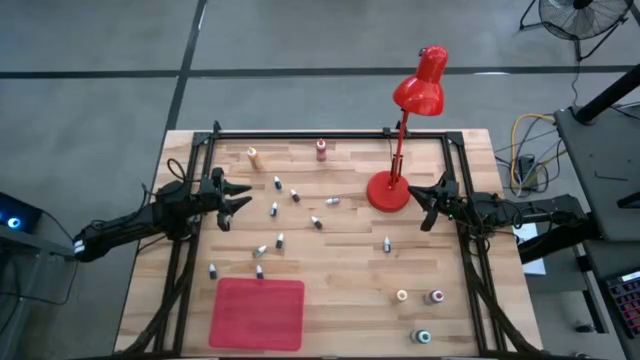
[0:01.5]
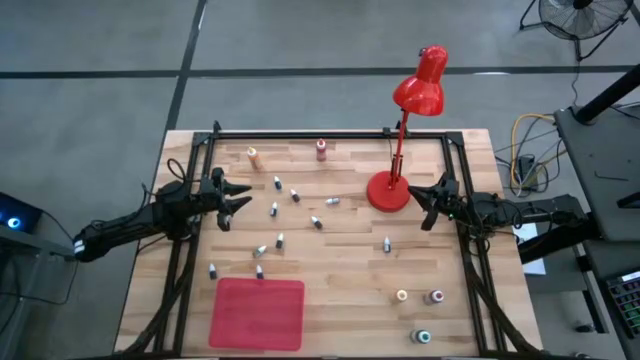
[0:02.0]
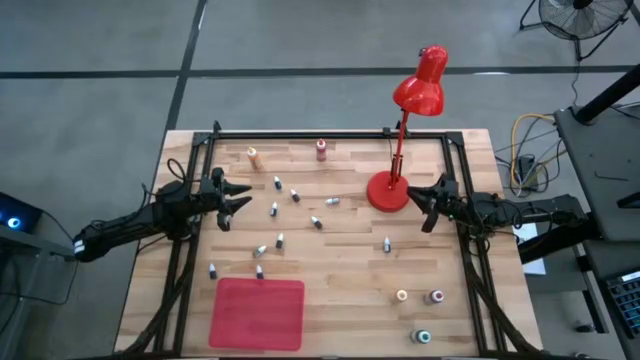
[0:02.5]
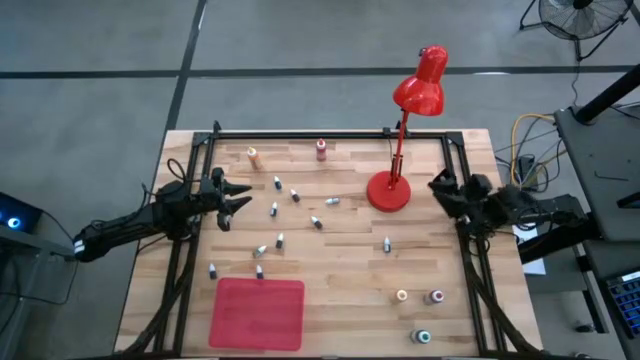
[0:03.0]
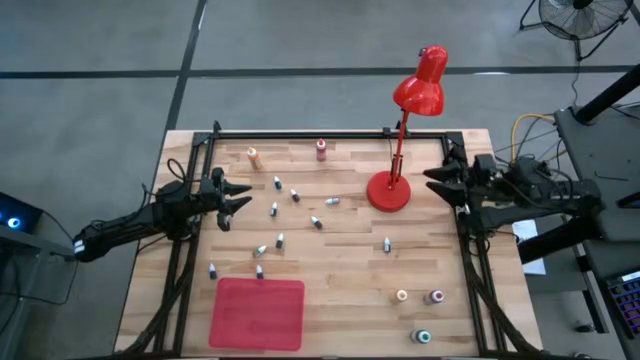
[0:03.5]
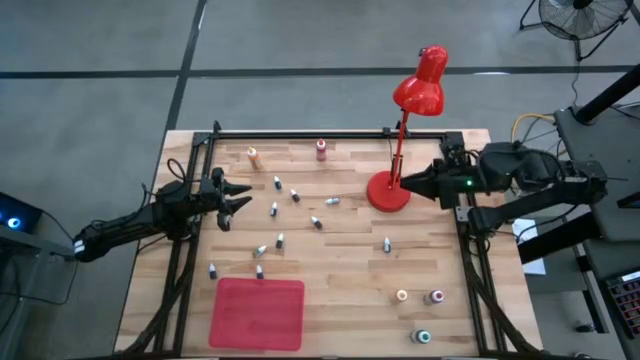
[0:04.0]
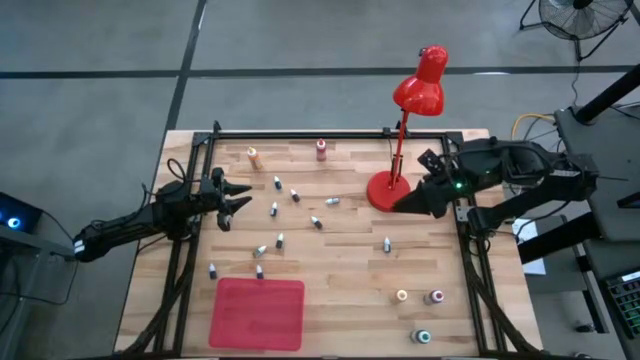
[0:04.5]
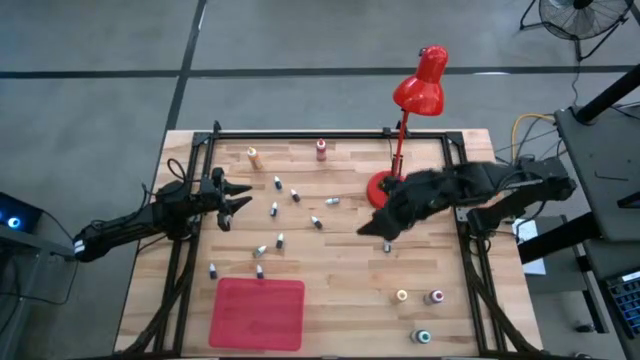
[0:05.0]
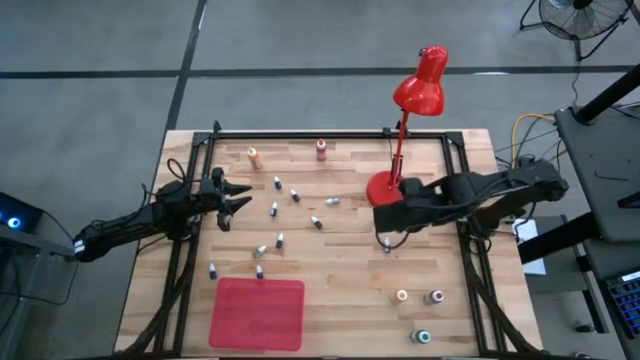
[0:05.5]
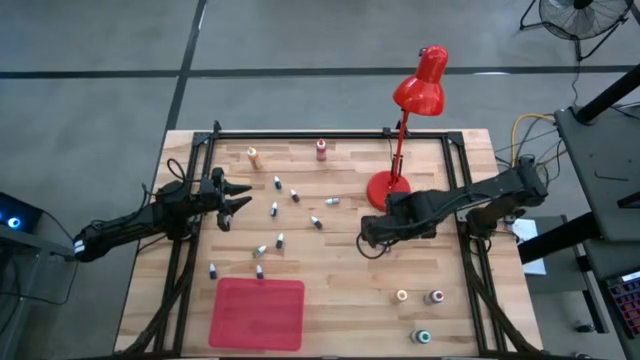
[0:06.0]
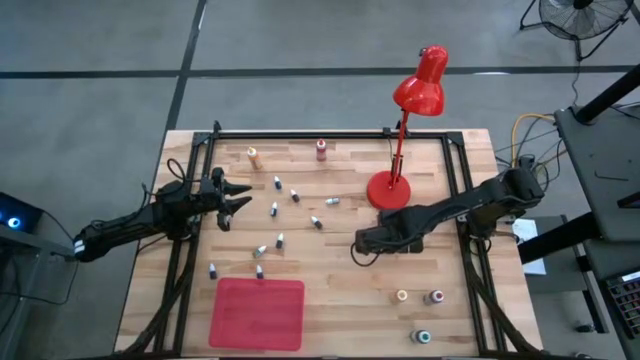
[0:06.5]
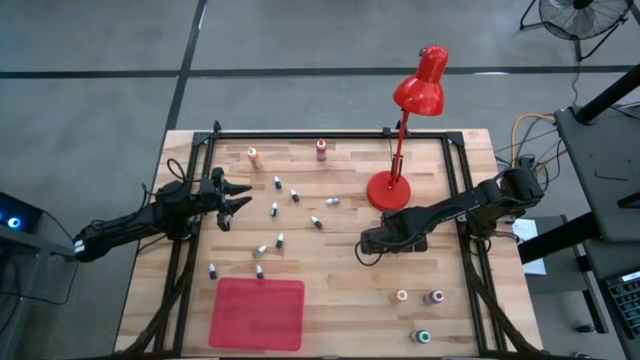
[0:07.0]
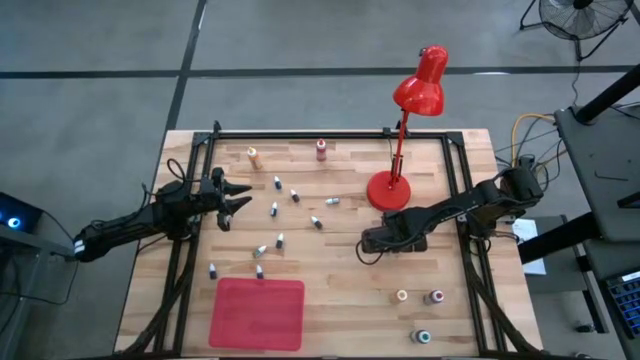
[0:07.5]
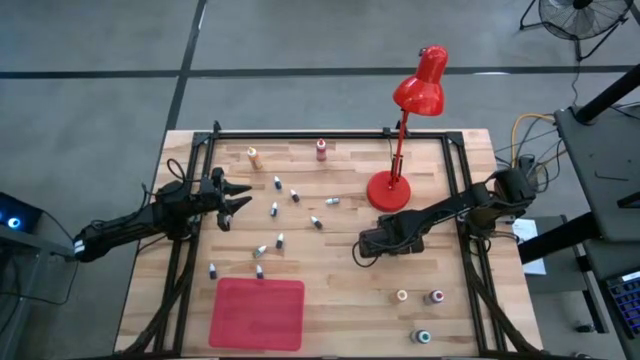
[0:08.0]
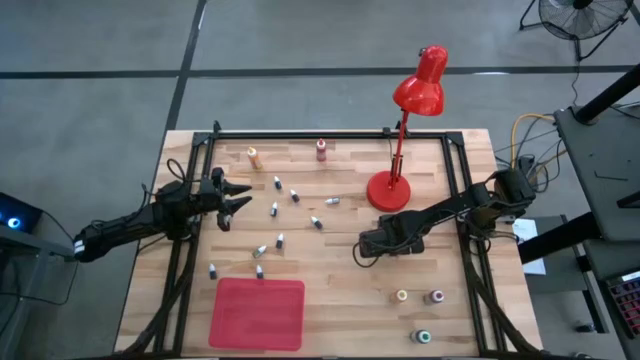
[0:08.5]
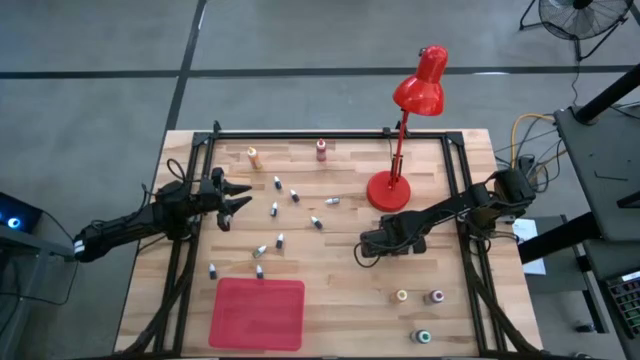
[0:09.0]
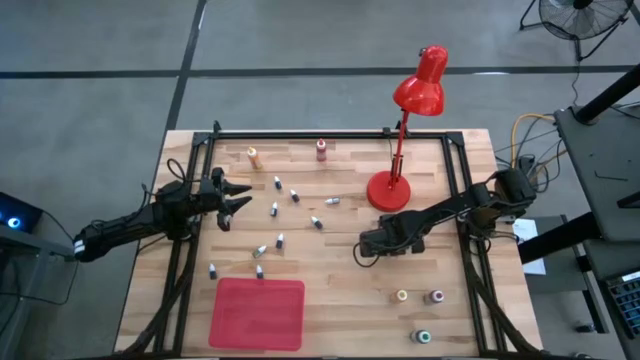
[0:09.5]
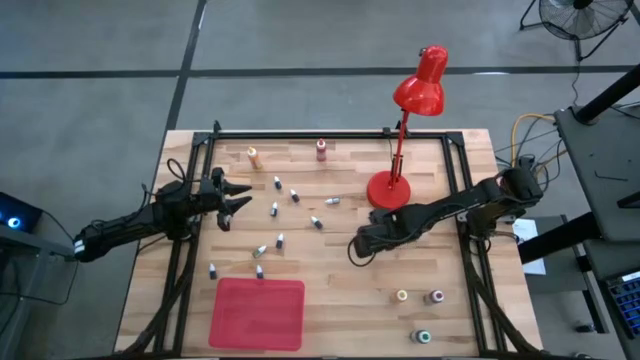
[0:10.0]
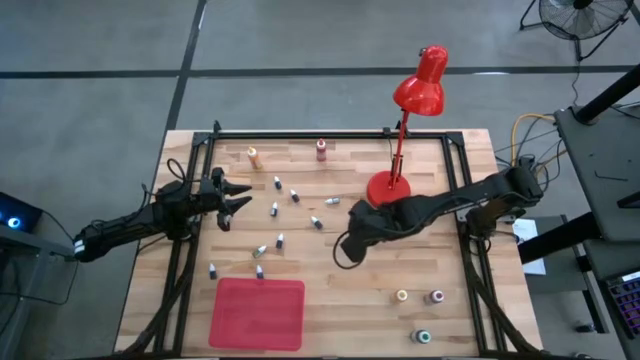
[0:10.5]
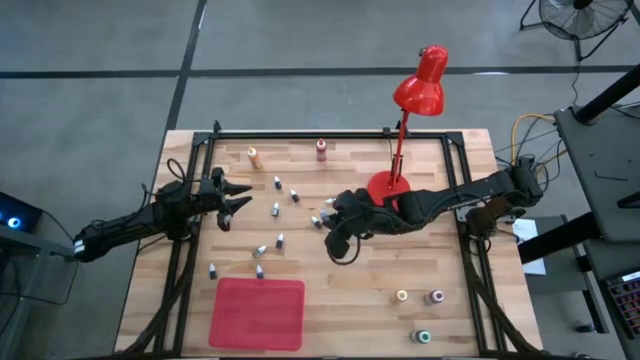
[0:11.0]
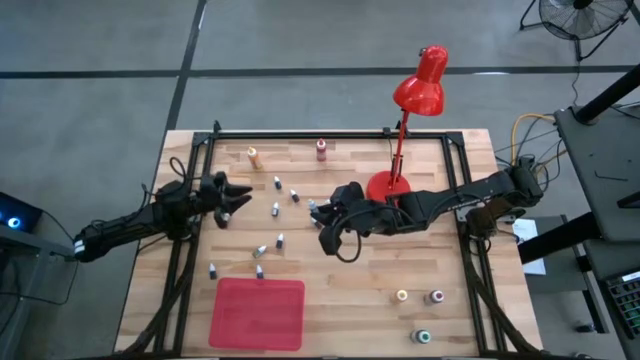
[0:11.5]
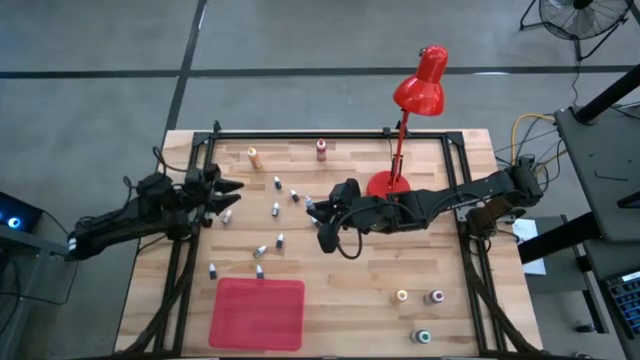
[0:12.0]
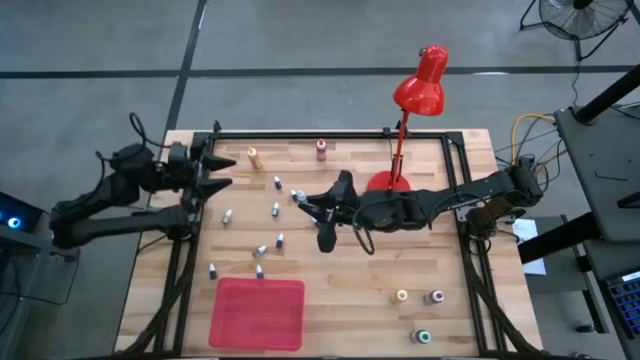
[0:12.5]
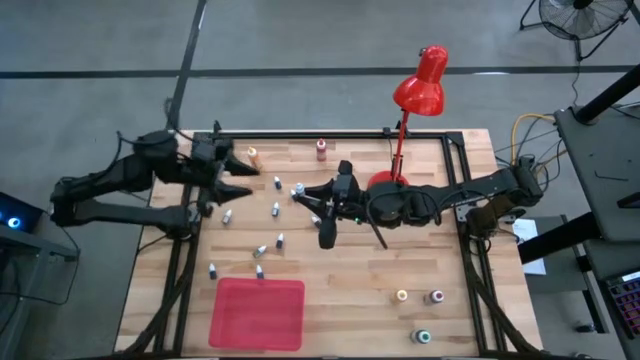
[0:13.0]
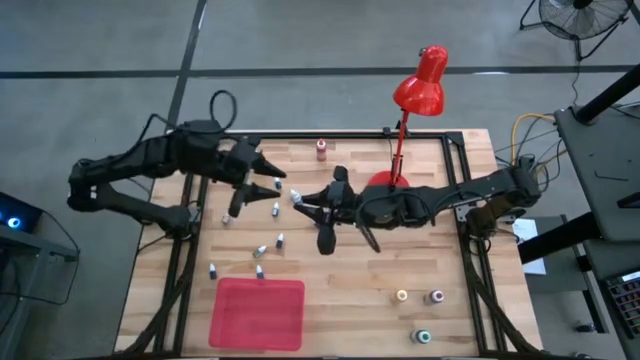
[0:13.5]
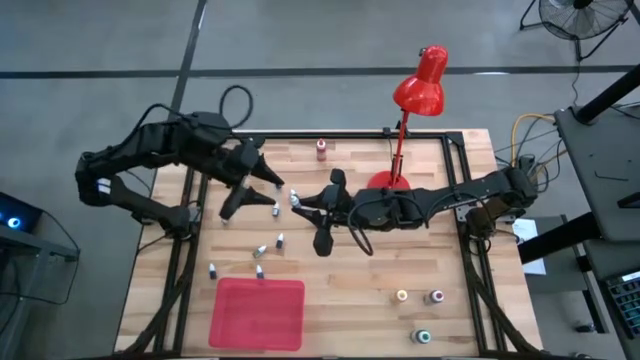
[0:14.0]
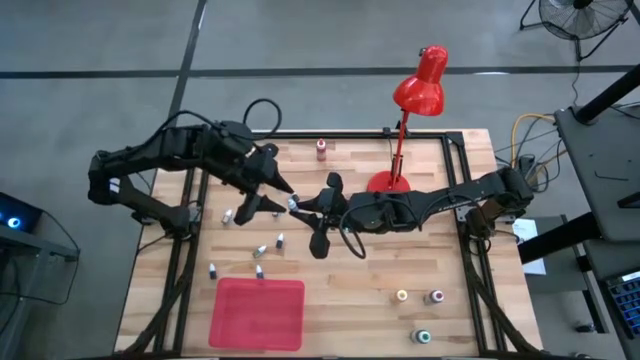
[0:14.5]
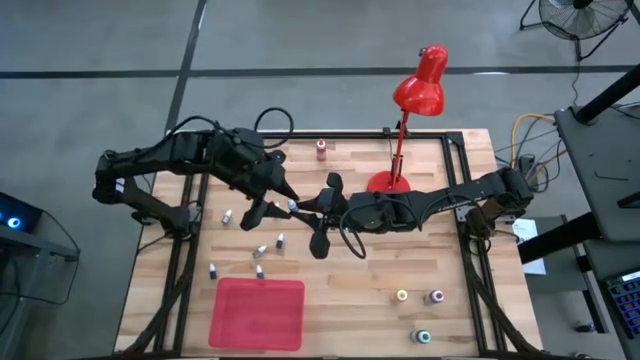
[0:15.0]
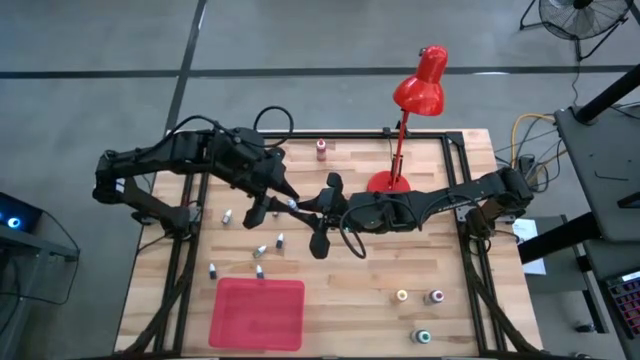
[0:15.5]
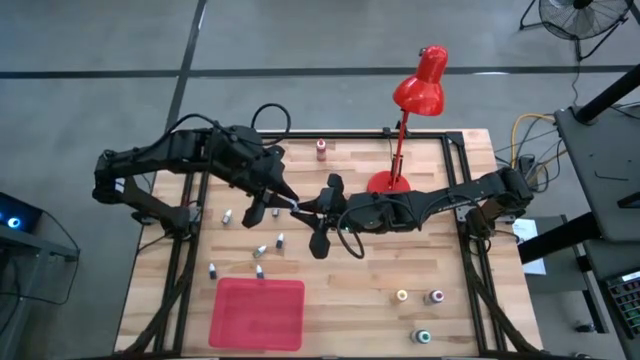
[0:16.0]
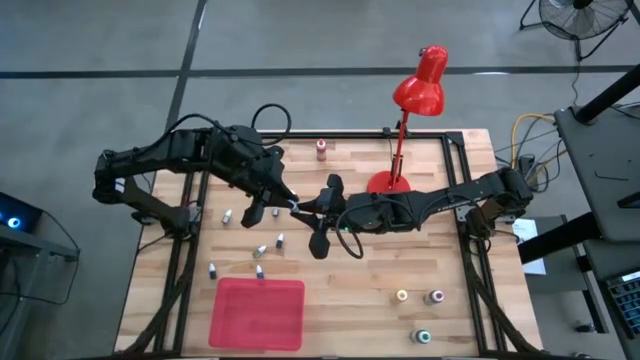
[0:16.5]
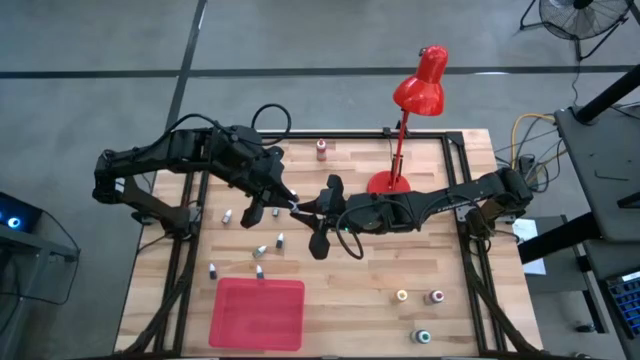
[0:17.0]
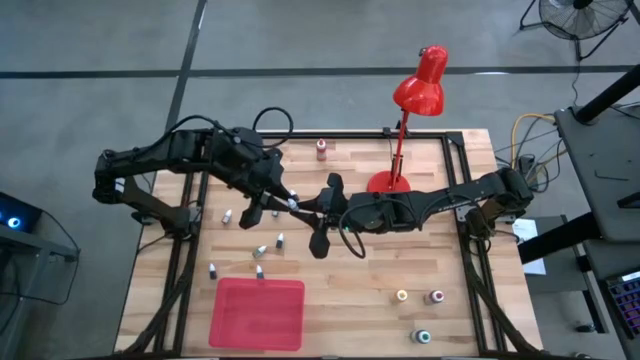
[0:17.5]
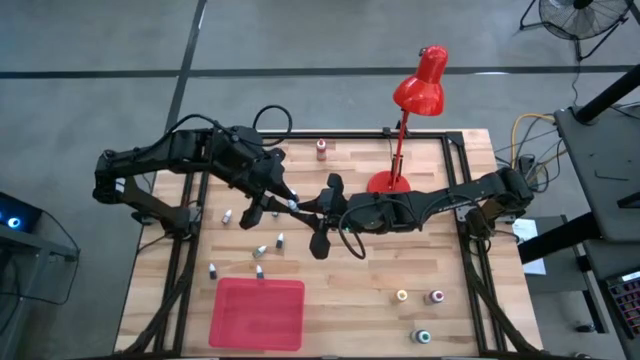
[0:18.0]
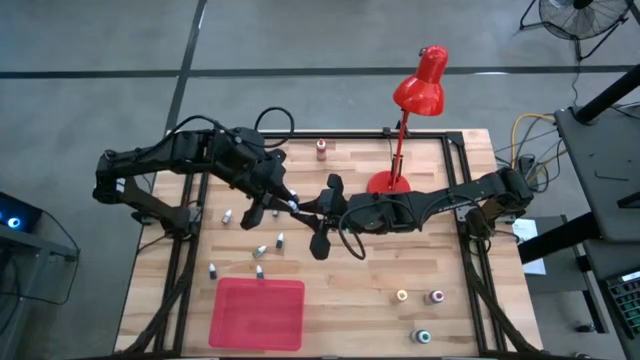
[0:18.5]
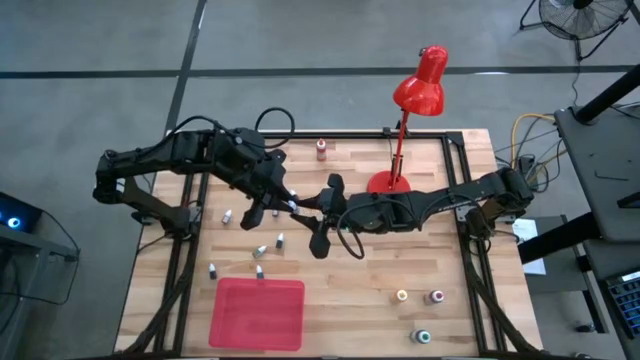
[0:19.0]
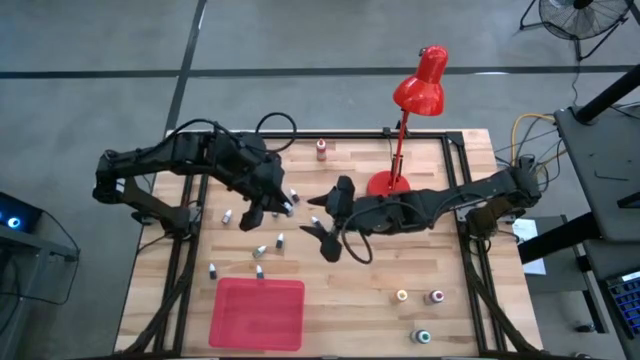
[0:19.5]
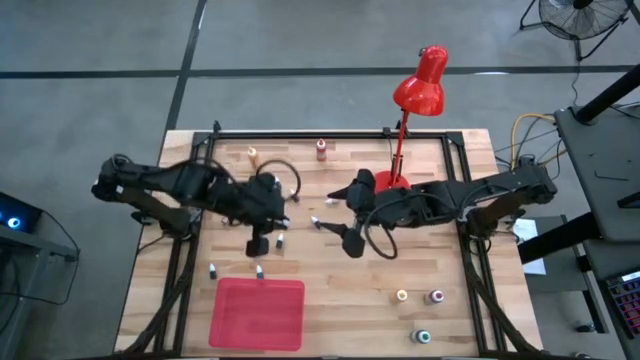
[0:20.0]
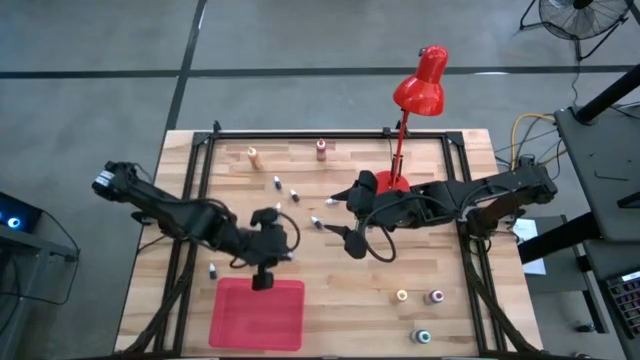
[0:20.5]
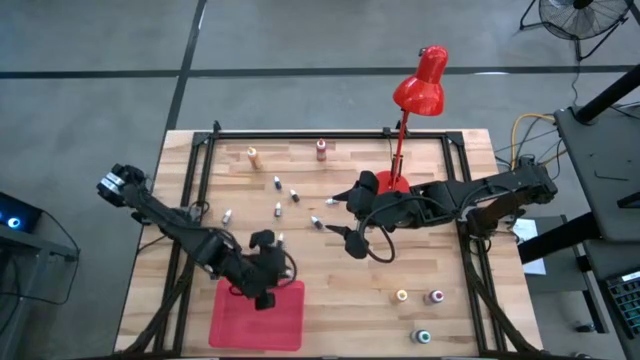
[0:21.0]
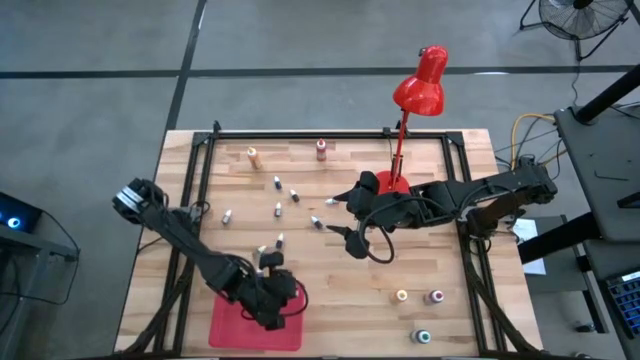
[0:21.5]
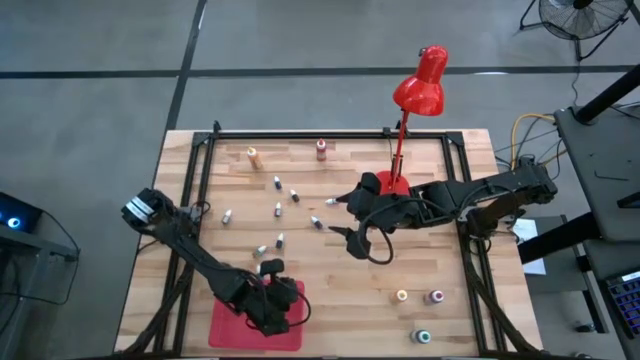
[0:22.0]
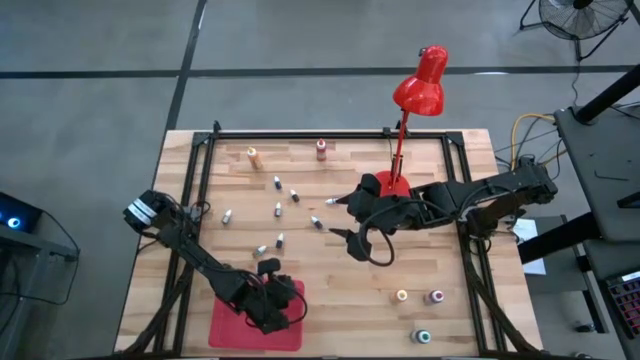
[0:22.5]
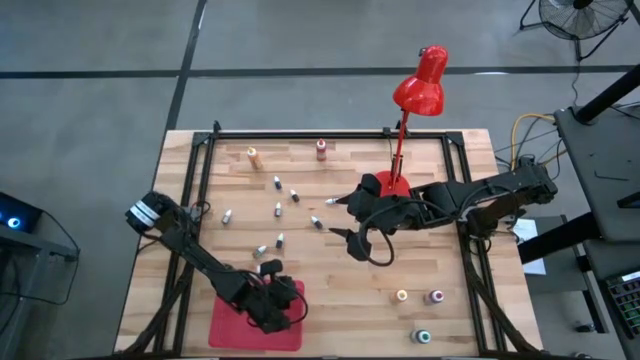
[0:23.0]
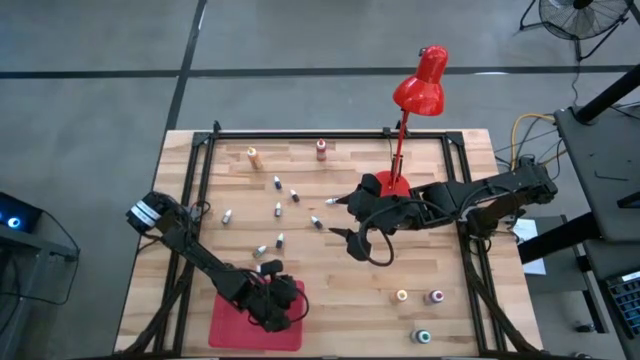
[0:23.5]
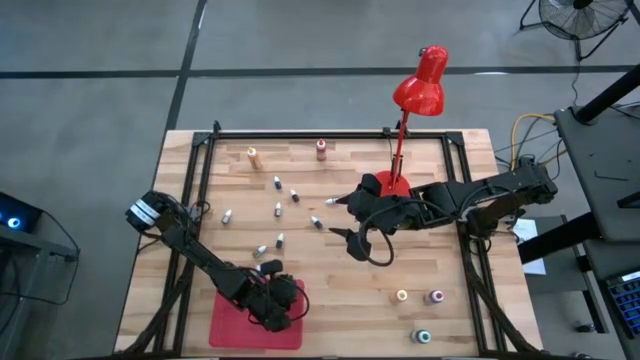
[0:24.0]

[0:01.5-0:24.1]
Task: Pick & Place food coloring
Put the small green food coloring bottle into the red bin
